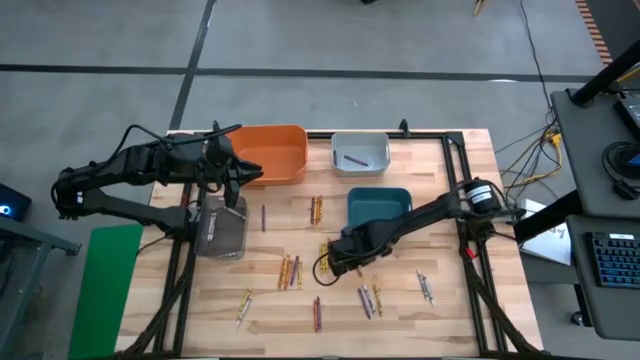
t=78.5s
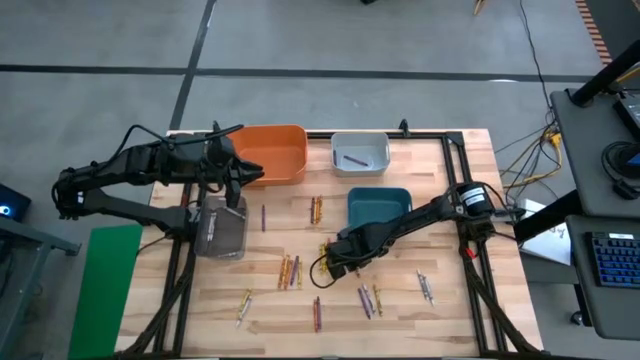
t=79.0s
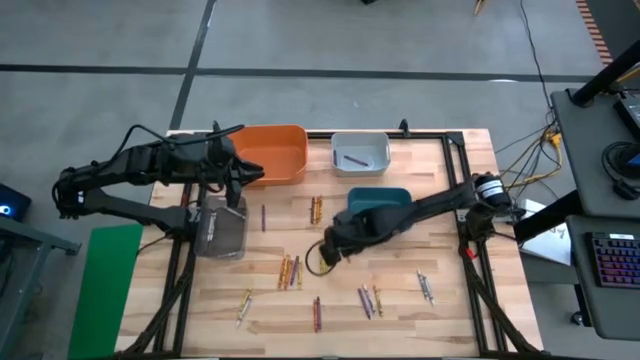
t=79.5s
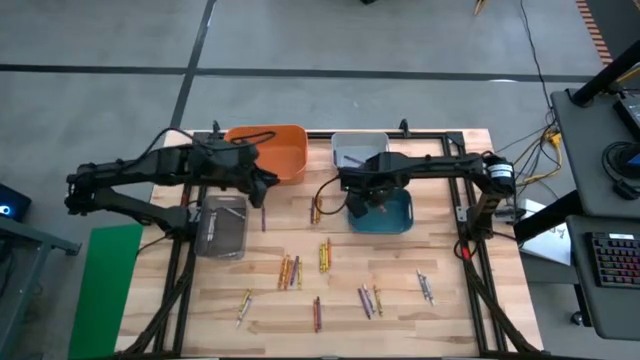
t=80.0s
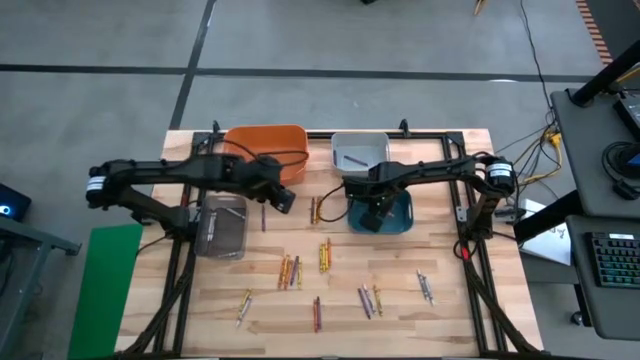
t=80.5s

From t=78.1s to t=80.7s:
Task: Sort crayons
Put the orange crayon into the blue bin

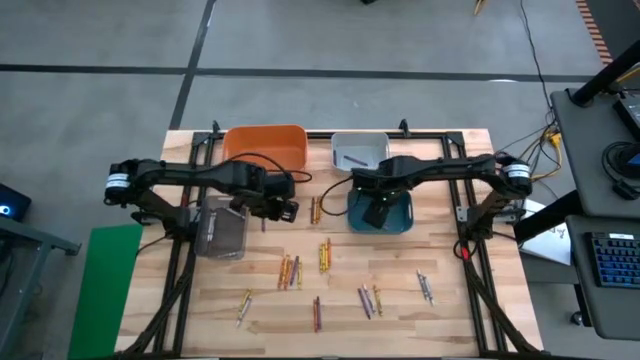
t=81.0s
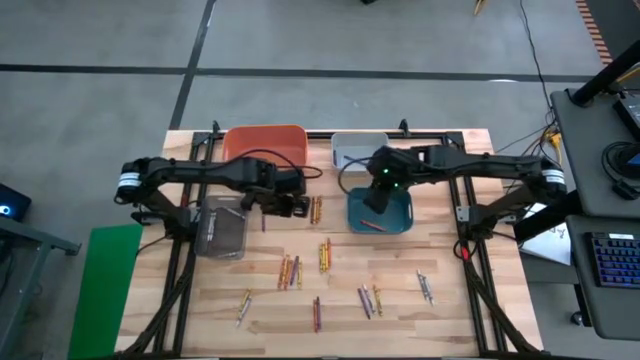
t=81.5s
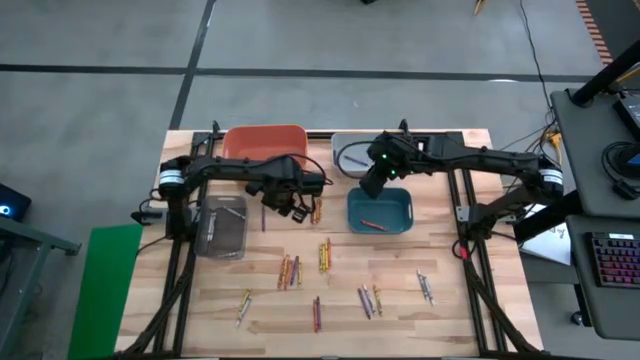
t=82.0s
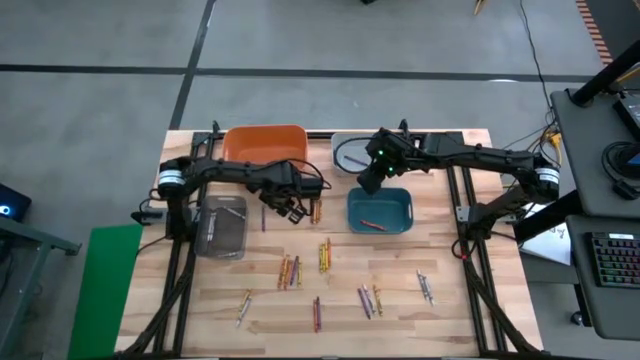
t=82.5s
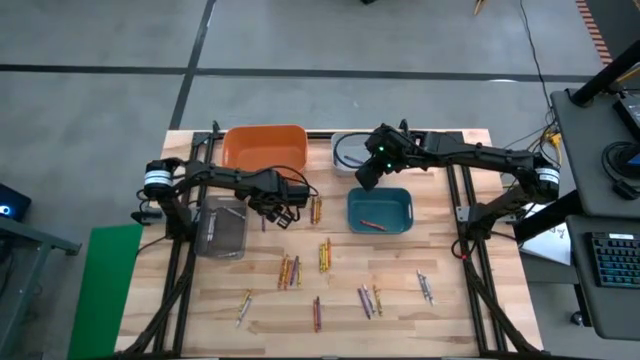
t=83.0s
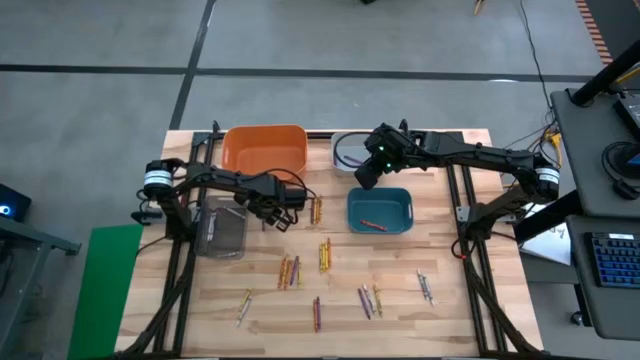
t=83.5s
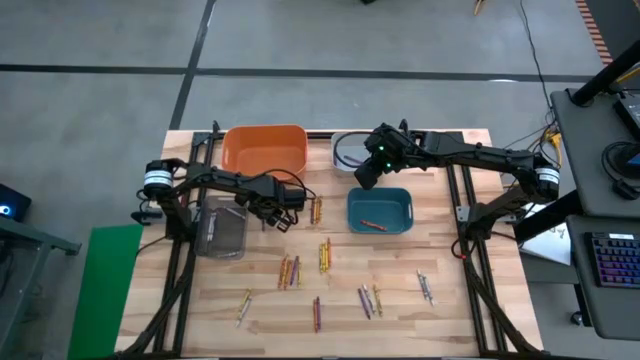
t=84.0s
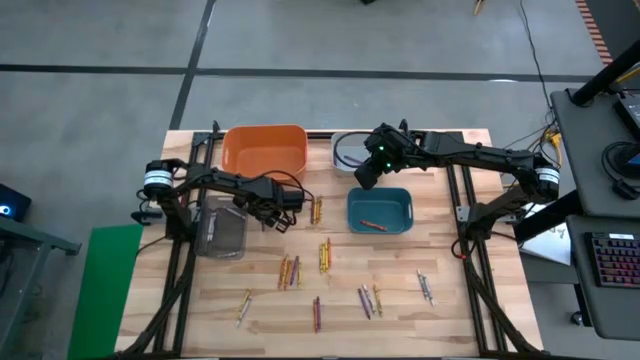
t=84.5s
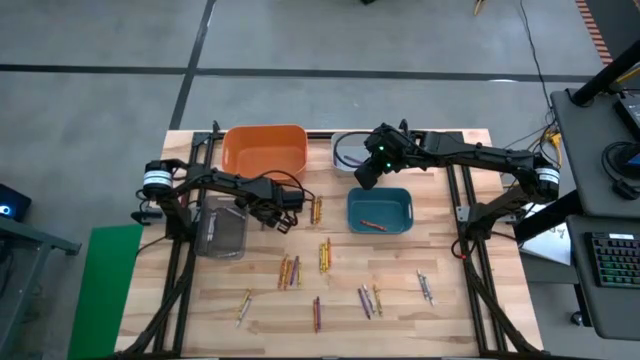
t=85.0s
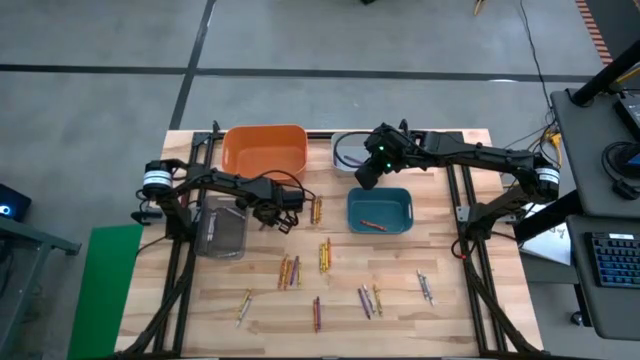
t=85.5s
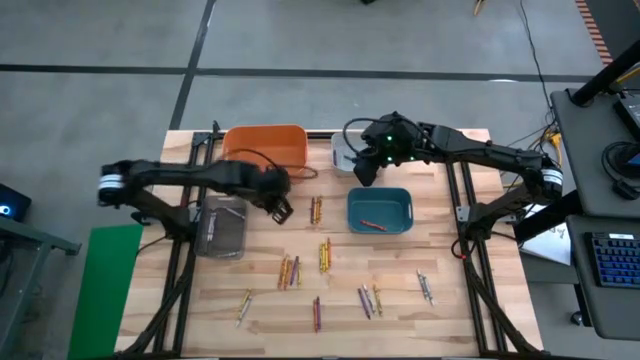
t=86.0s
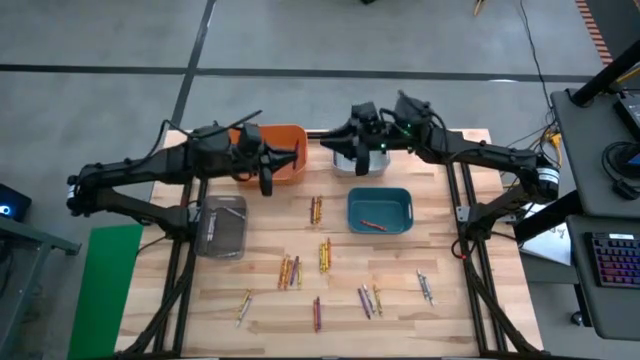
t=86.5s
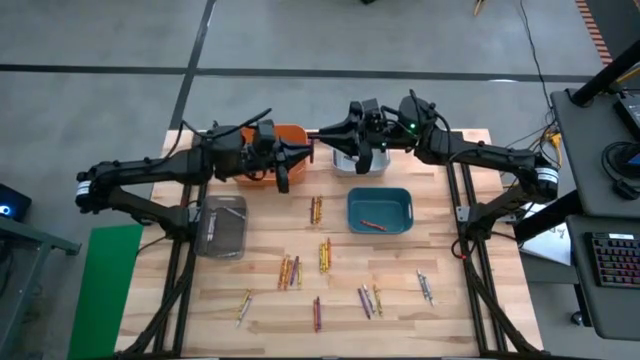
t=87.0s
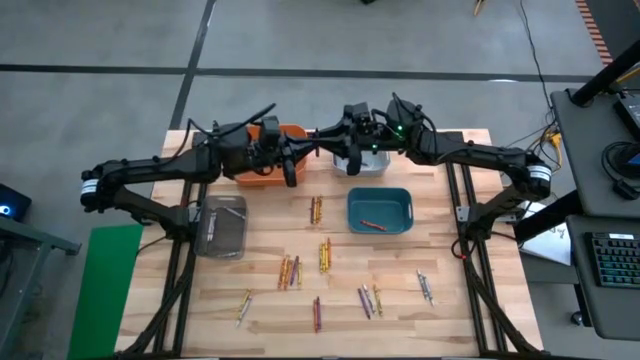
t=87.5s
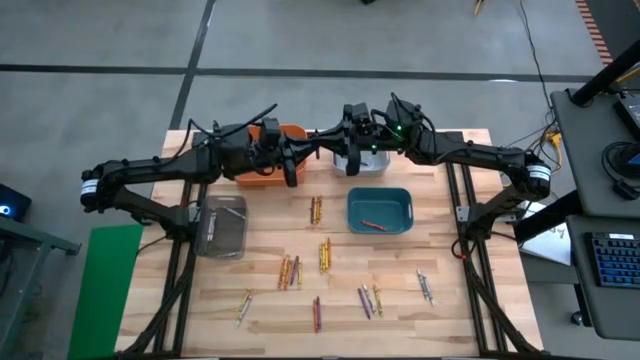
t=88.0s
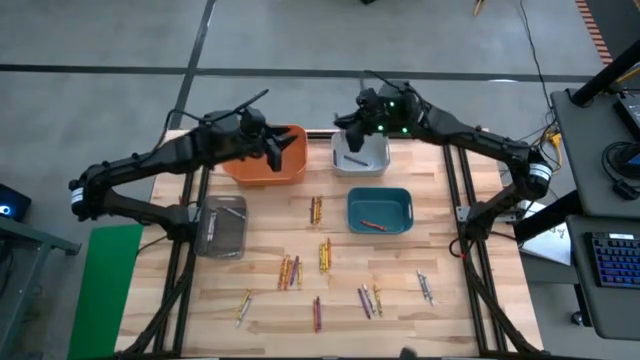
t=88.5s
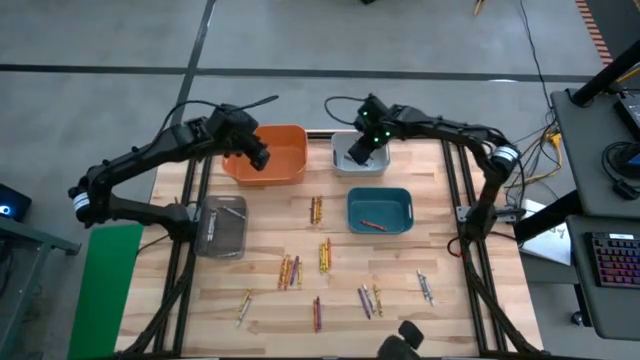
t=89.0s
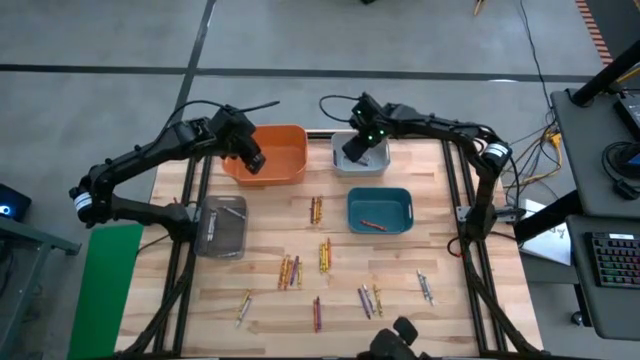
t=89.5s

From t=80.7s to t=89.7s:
Put the violet crayon into the gray bin

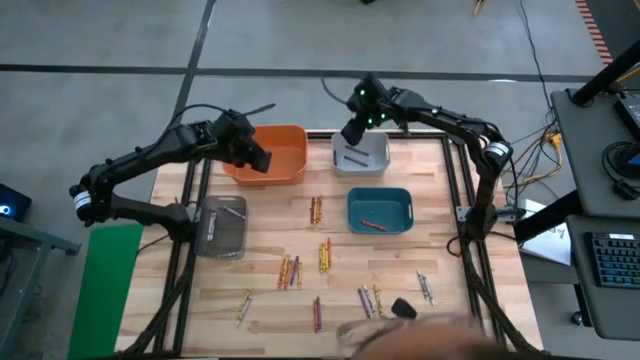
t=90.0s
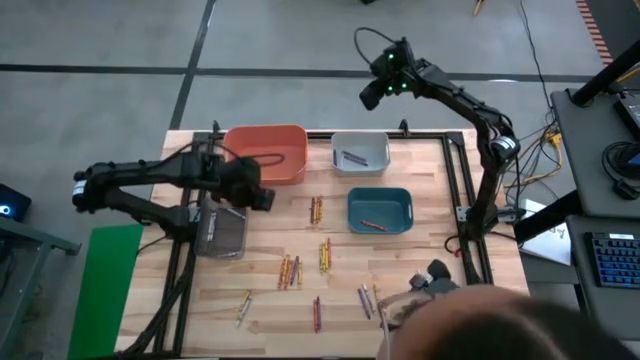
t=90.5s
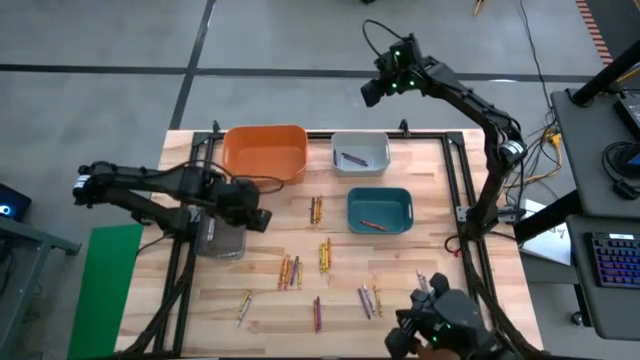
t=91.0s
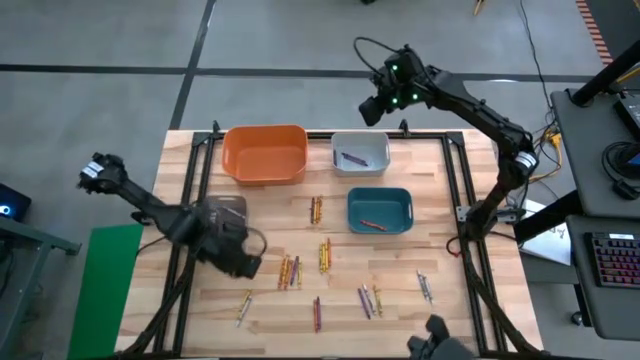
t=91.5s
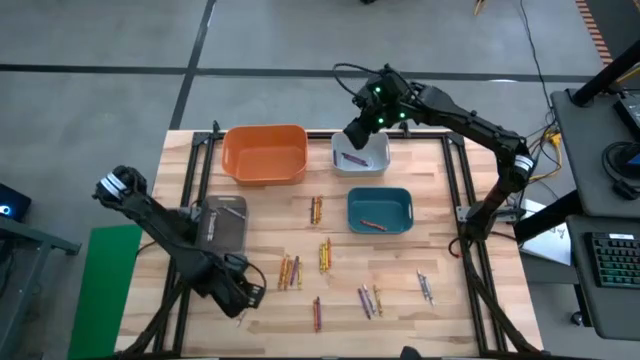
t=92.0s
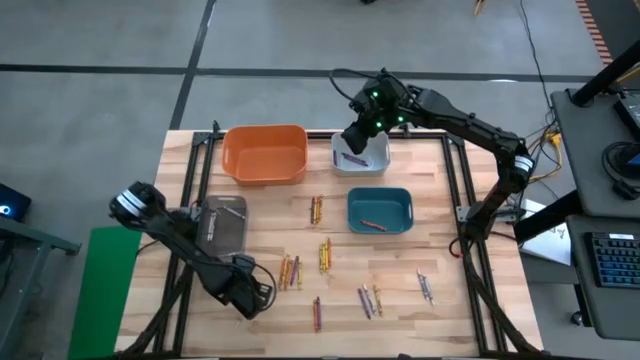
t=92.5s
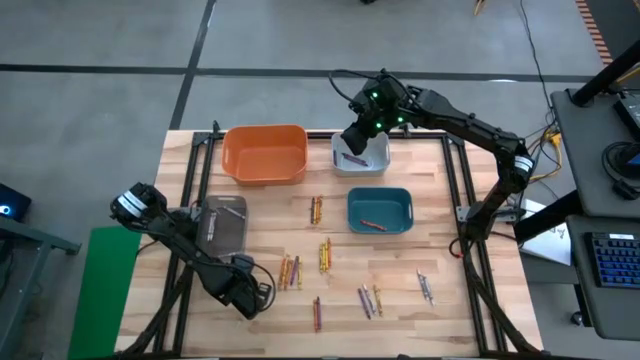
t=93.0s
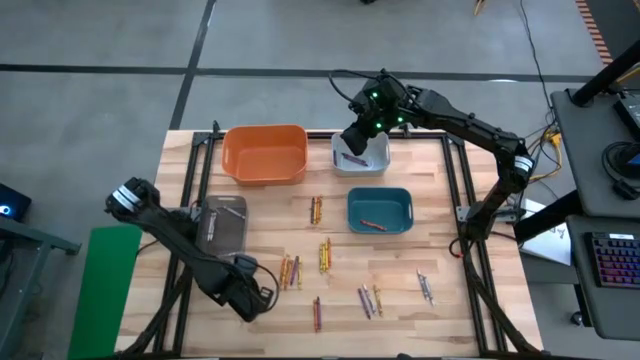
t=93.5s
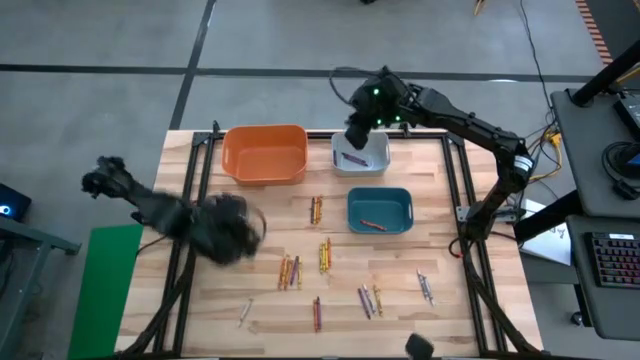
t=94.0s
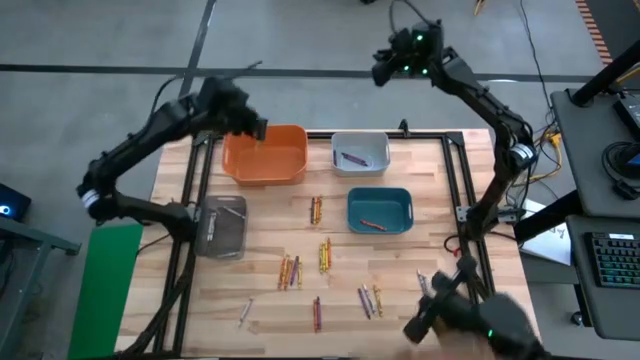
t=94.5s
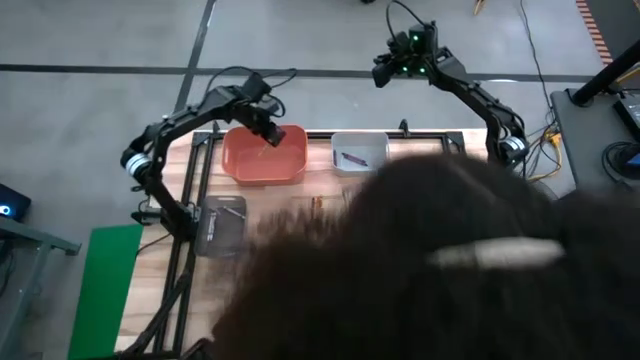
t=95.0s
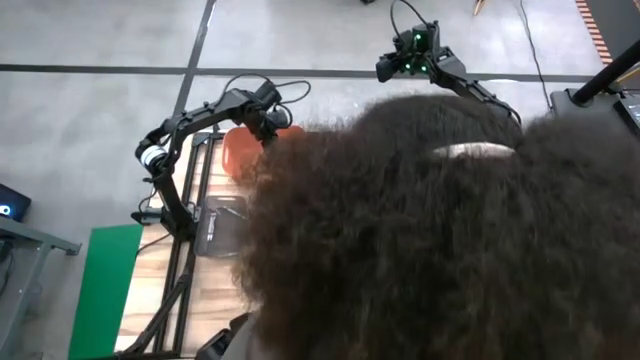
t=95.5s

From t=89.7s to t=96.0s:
Put the yellow crayon into the orange bin

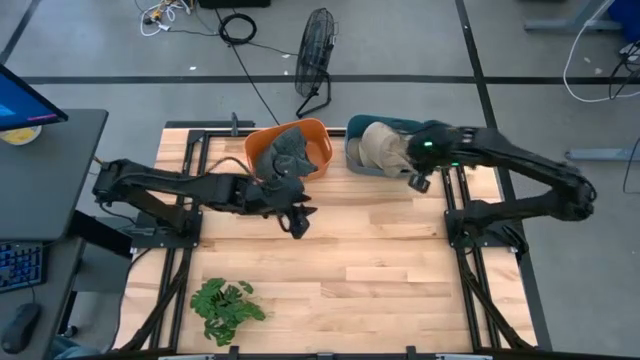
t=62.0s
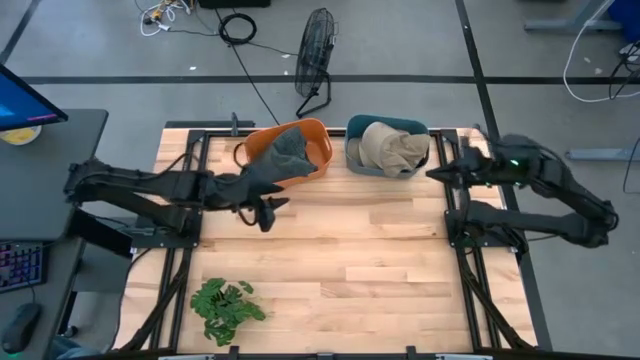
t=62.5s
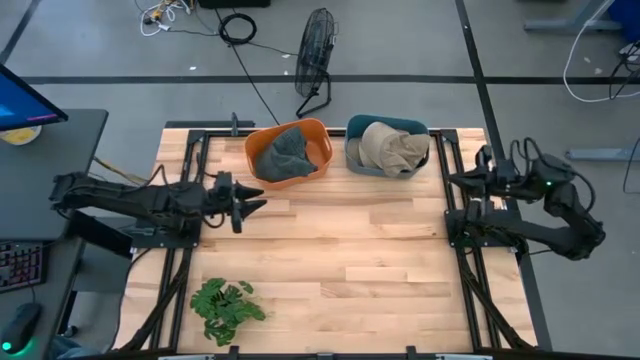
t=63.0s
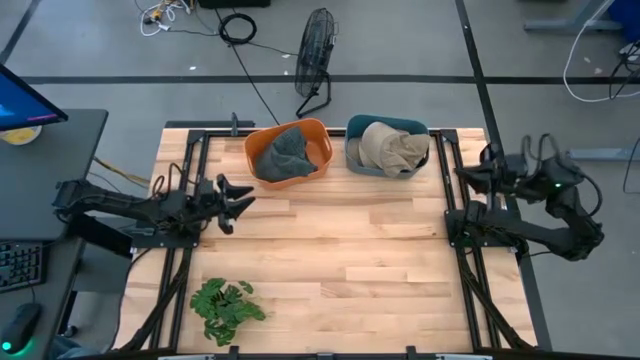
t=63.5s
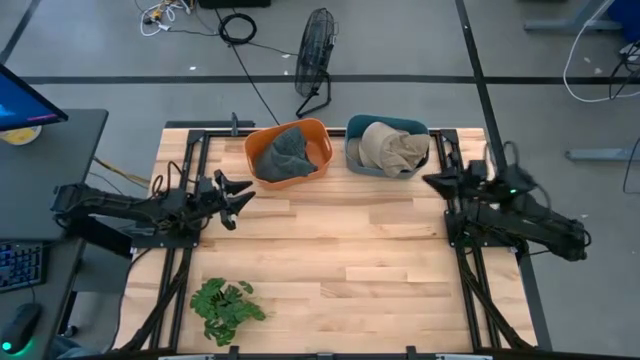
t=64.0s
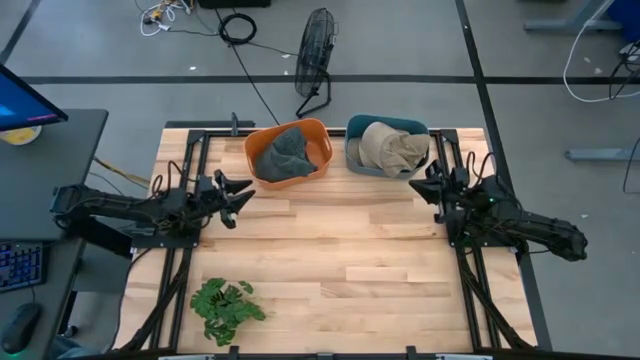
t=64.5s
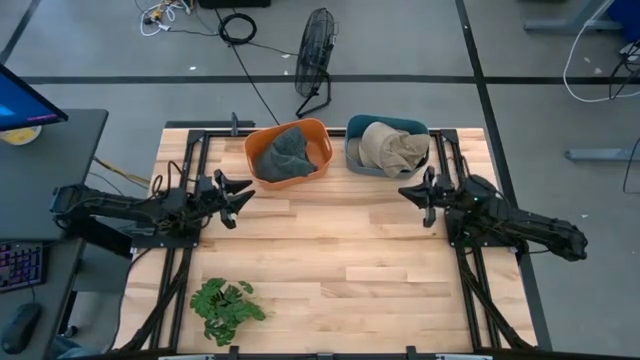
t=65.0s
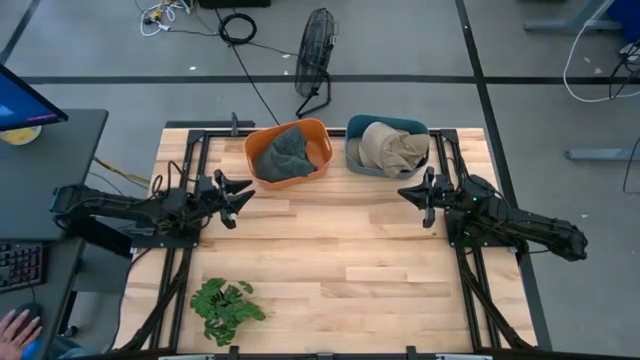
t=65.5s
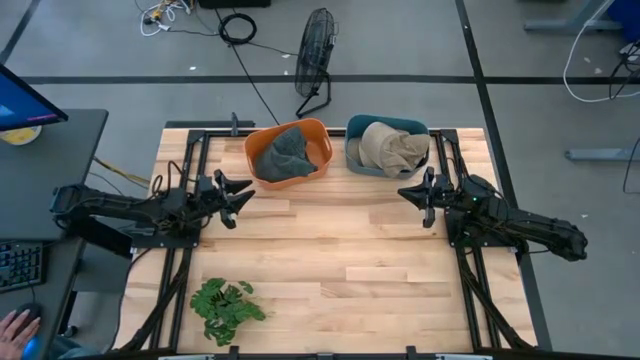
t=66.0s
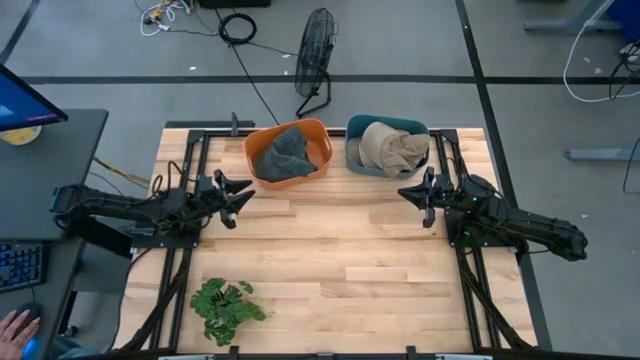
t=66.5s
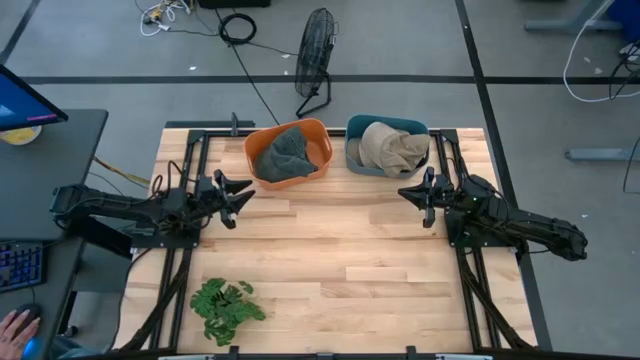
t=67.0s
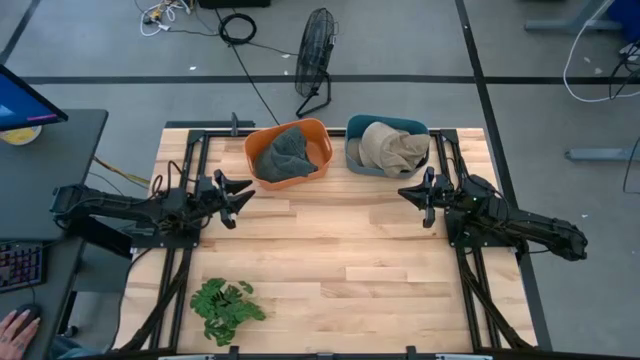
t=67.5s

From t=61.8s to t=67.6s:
Task: Pick & Place hat
Return to Home Position
